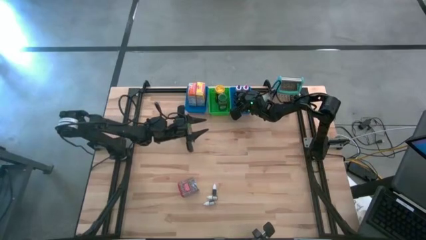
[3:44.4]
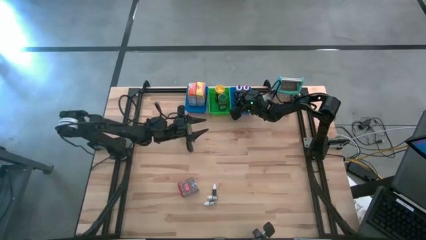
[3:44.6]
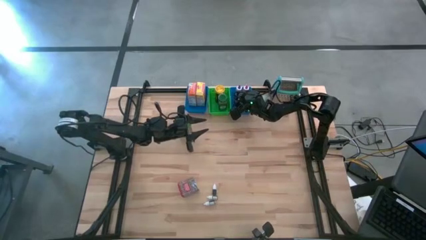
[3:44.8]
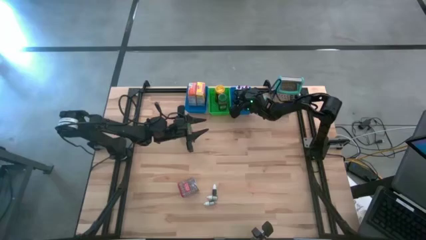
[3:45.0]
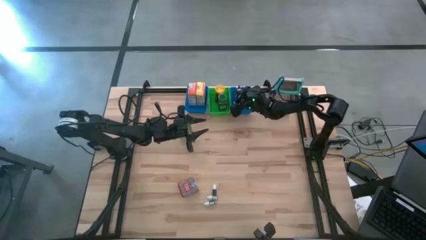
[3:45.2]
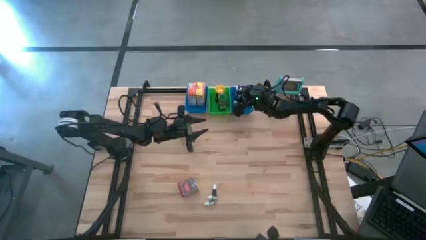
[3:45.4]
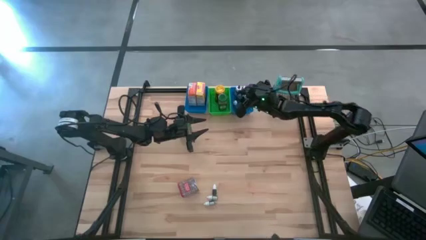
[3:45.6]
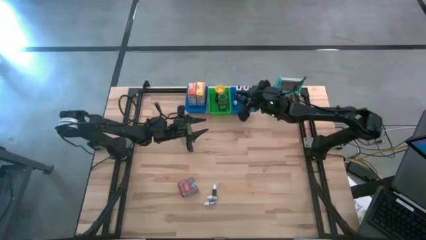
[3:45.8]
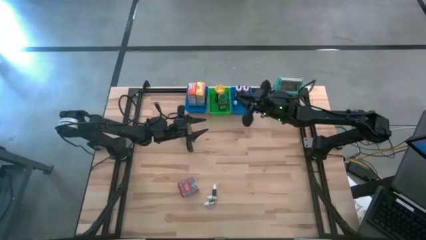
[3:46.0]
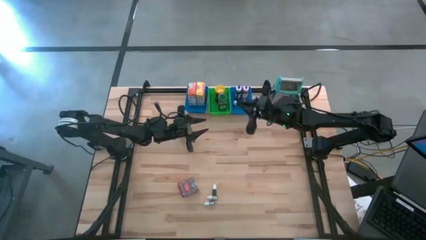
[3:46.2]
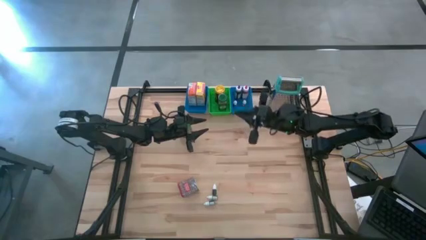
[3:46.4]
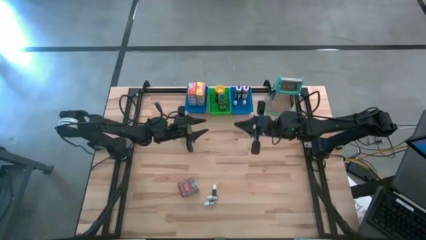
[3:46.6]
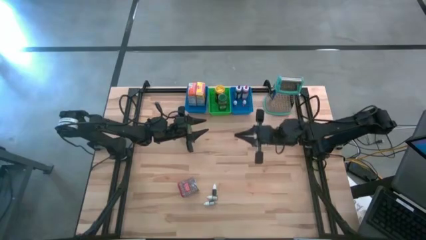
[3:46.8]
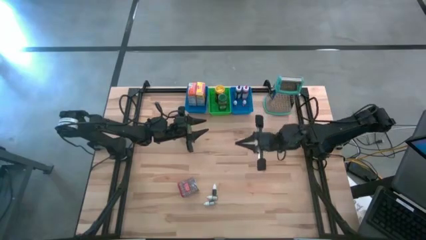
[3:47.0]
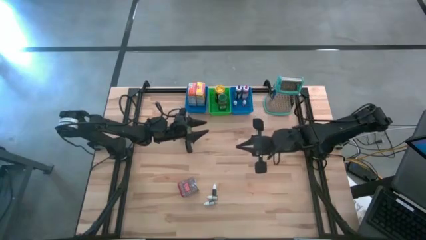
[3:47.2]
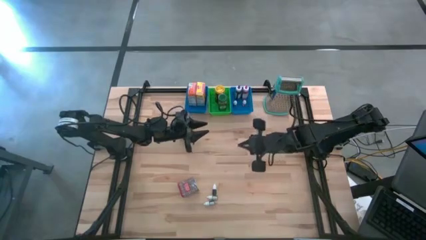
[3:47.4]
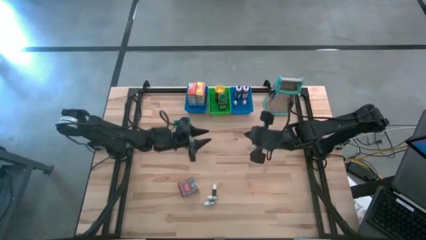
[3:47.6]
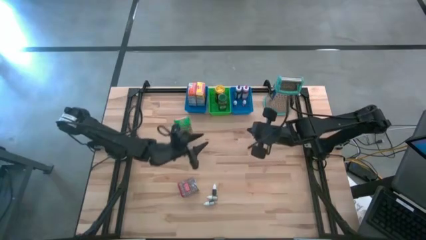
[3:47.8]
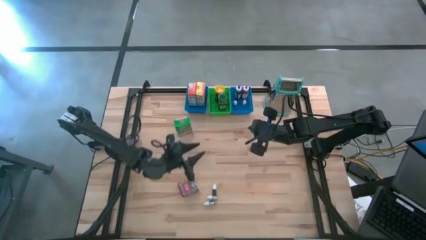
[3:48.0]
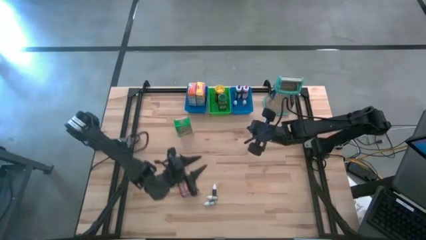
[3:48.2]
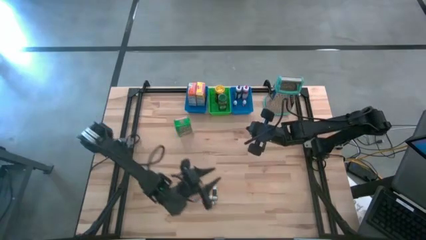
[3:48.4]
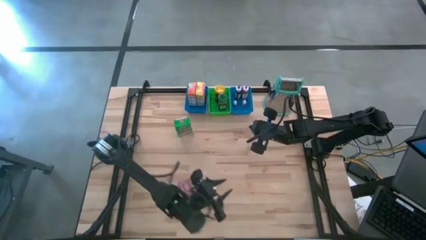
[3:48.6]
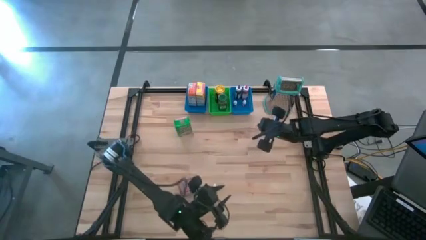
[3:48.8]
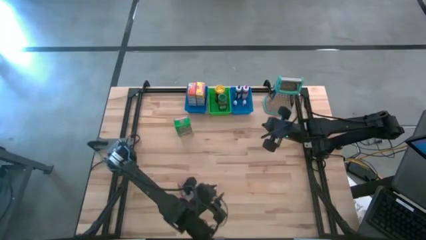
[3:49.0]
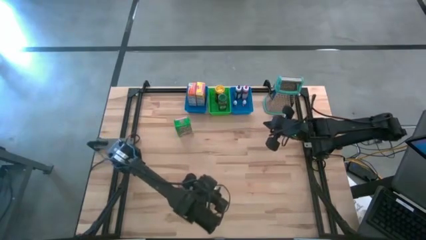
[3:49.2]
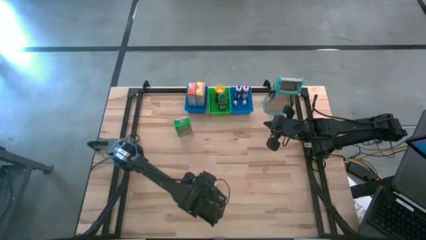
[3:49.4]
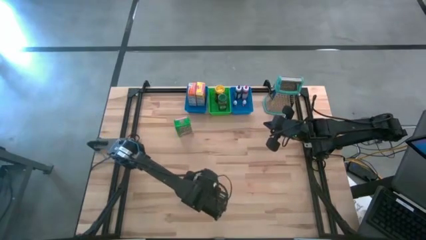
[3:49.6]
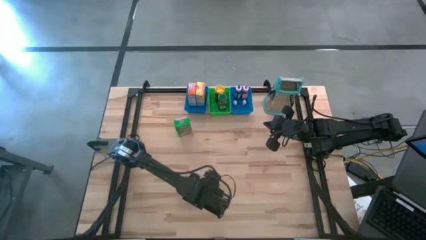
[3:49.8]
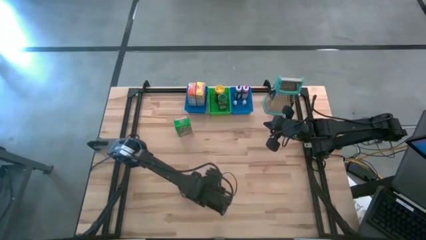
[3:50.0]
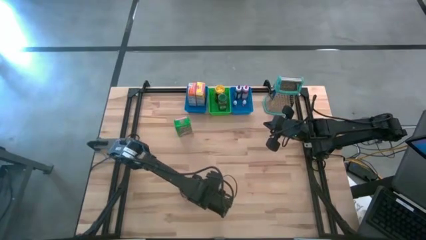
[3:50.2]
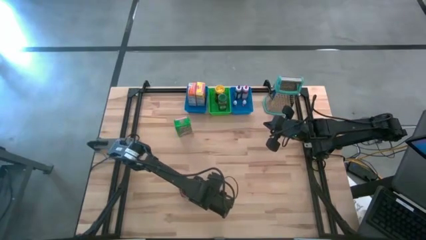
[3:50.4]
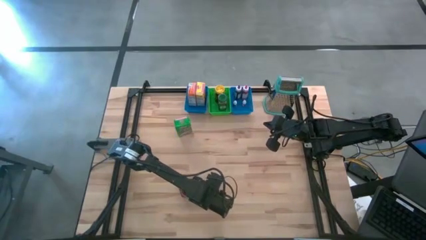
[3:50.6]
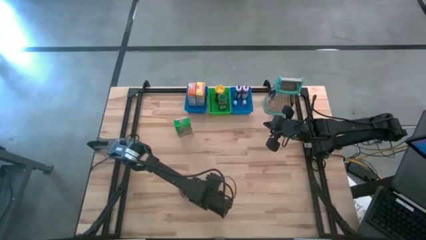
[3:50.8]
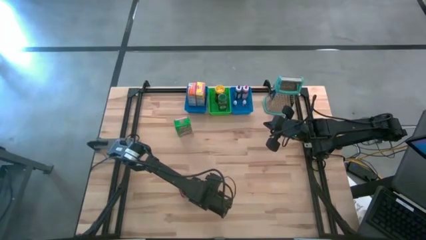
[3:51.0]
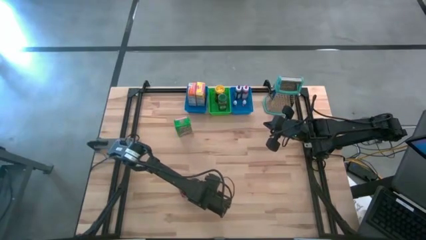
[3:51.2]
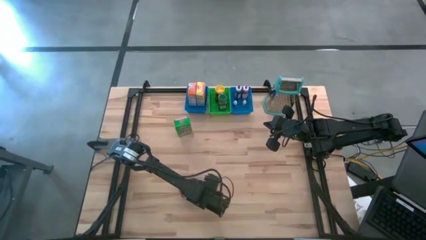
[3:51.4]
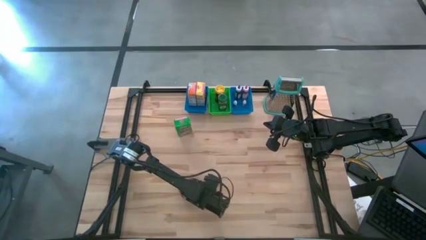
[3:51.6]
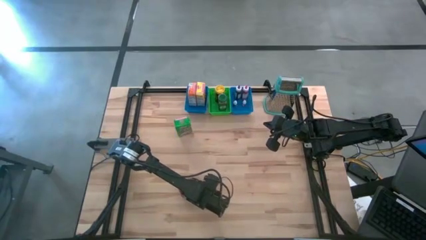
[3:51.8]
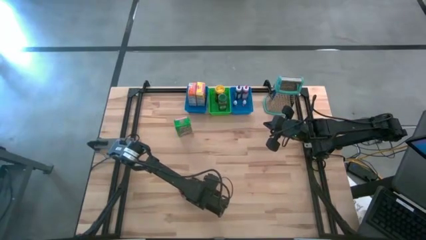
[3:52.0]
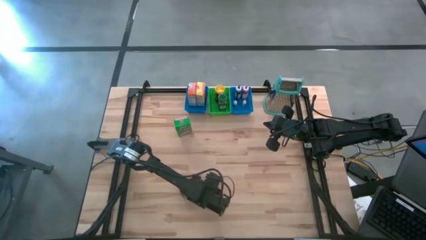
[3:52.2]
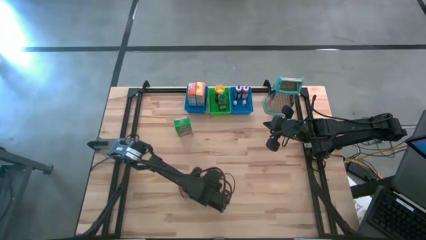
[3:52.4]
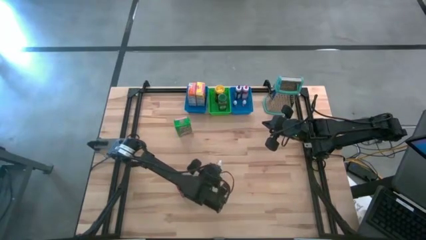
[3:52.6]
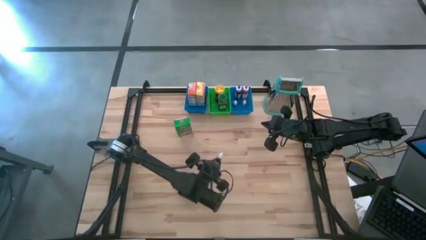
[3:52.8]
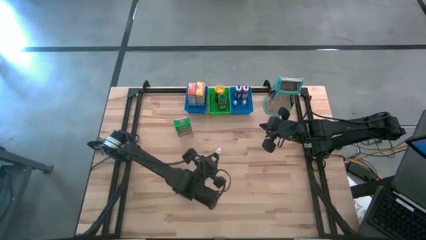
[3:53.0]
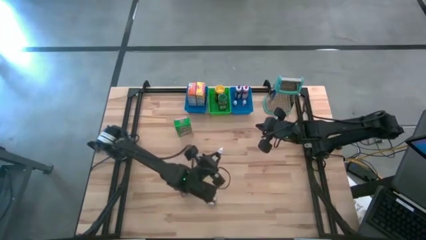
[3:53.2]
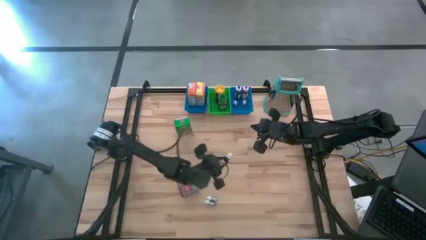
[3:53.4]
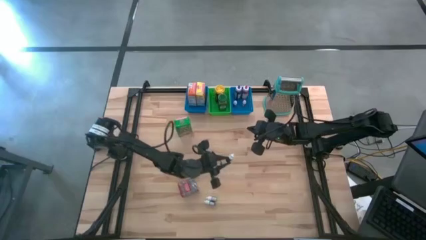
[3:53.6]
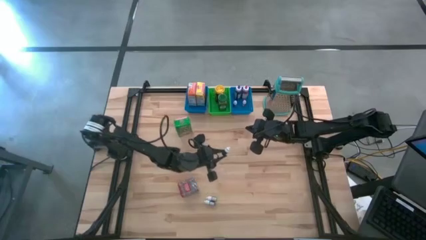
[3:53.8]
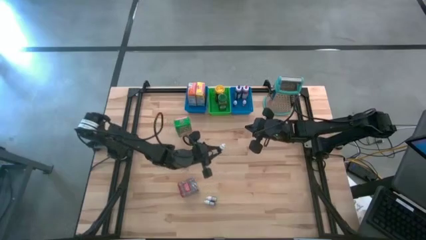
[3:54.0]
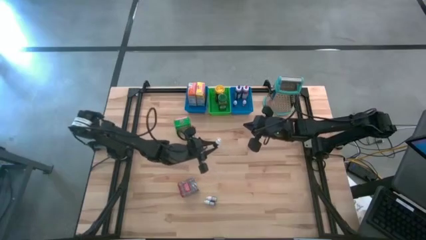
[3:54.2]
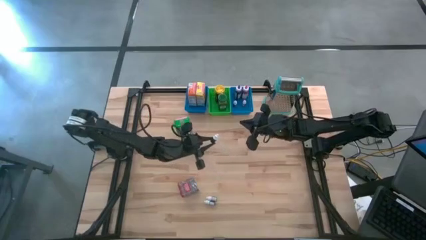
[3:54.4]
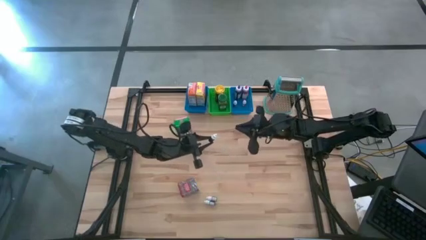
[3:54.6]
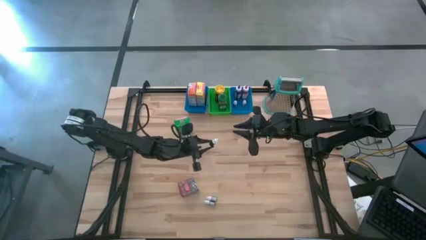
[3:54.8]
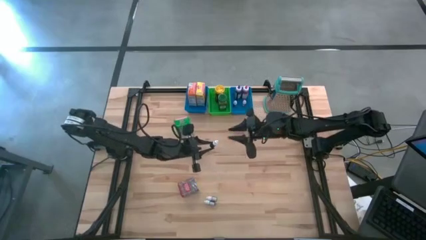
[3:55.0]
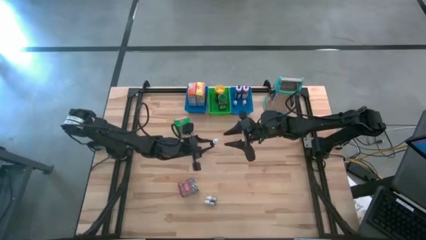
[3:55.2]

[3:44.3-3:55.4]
Task: Pick & Place Kitchen Items
Put the top small purple food bottle coloring into the right blue bin

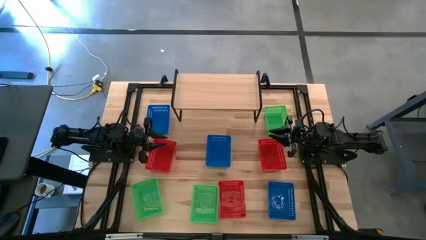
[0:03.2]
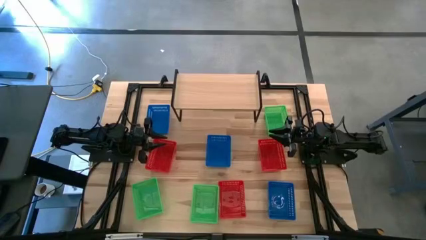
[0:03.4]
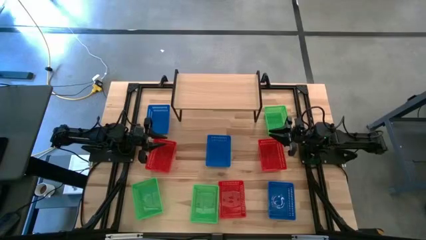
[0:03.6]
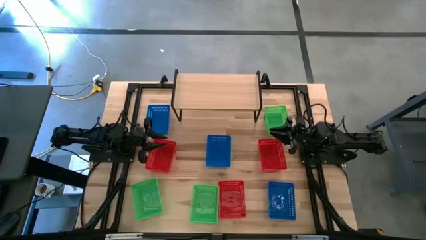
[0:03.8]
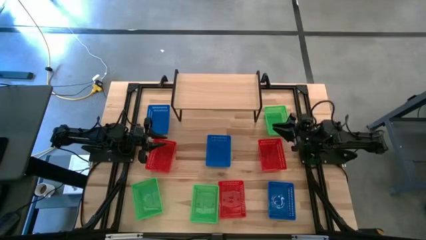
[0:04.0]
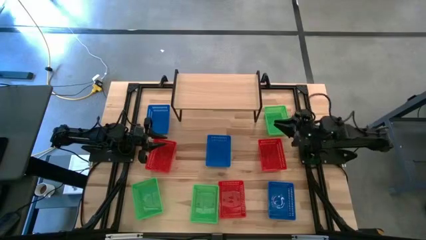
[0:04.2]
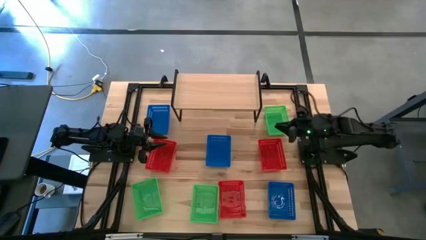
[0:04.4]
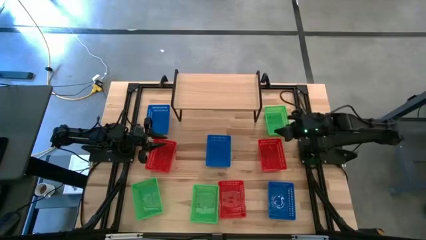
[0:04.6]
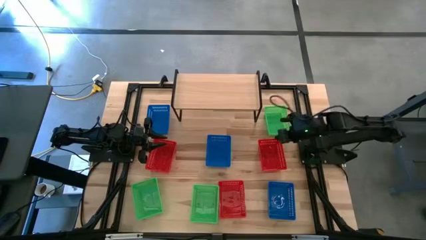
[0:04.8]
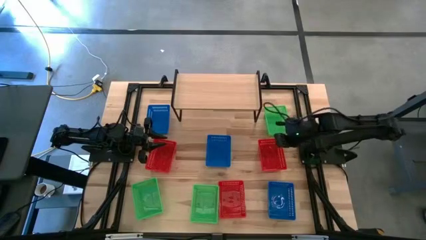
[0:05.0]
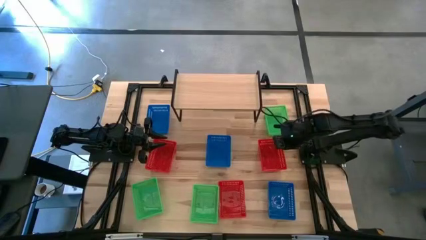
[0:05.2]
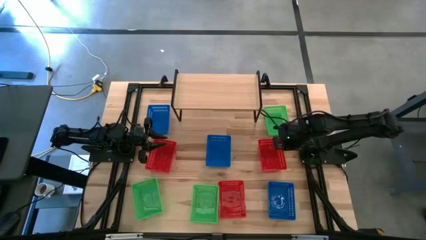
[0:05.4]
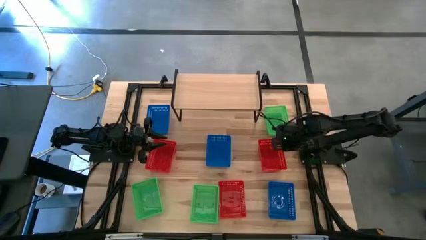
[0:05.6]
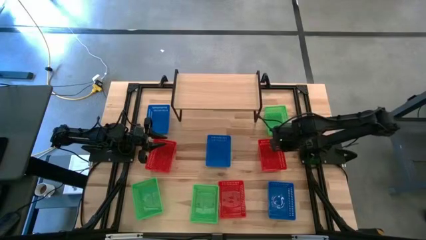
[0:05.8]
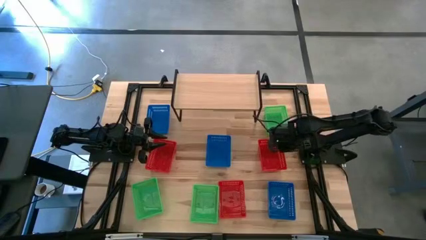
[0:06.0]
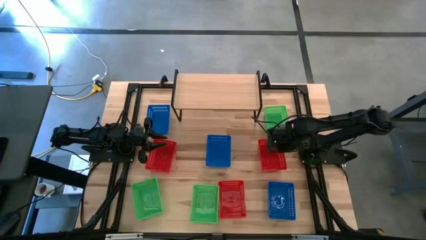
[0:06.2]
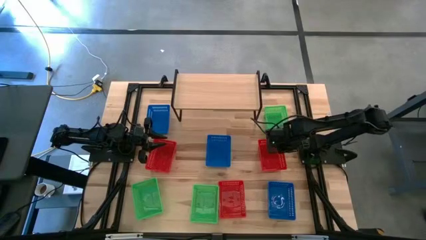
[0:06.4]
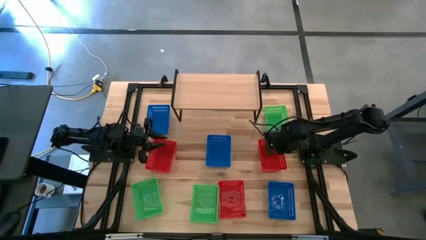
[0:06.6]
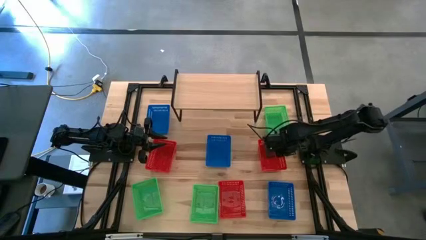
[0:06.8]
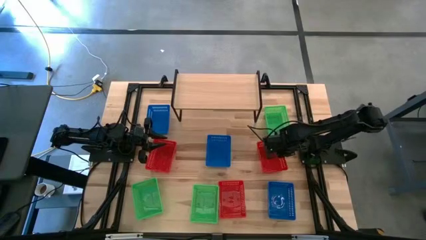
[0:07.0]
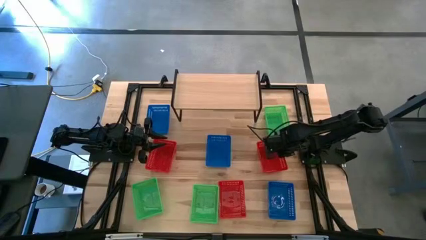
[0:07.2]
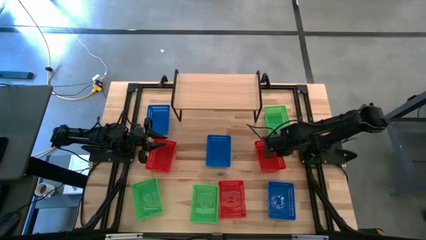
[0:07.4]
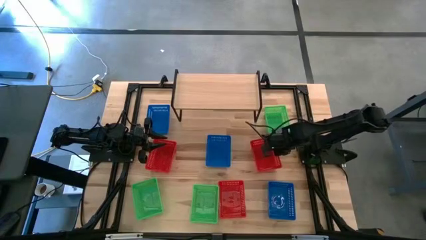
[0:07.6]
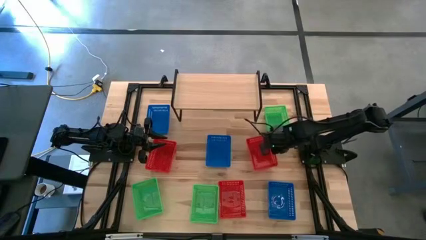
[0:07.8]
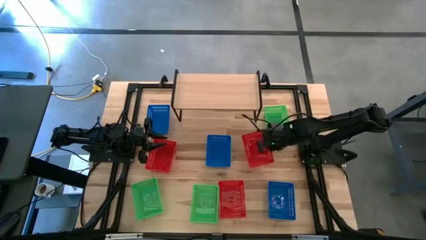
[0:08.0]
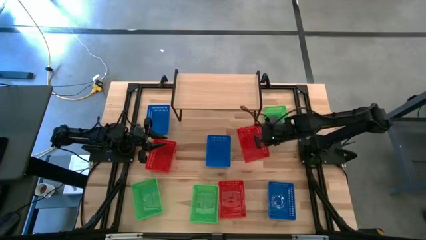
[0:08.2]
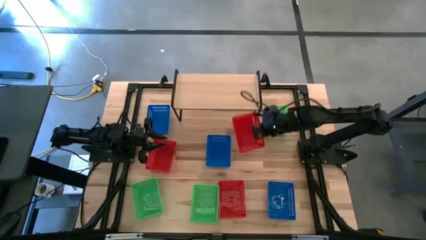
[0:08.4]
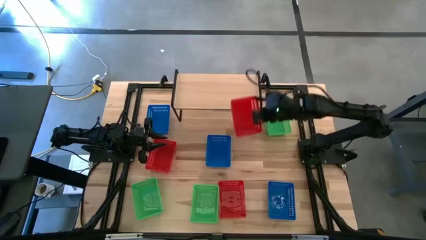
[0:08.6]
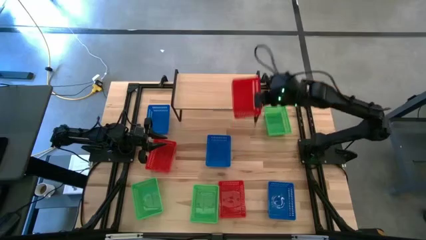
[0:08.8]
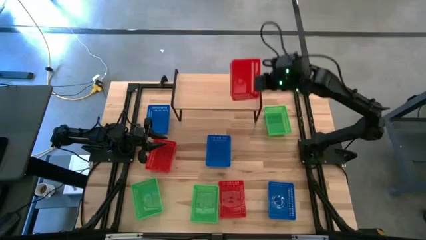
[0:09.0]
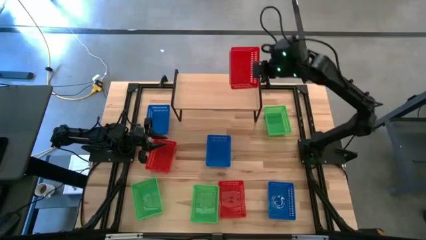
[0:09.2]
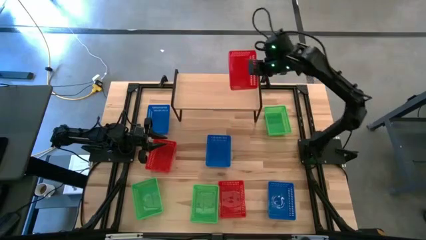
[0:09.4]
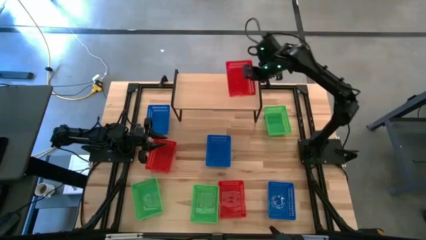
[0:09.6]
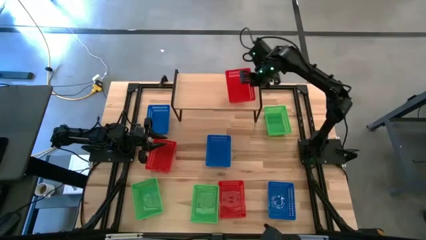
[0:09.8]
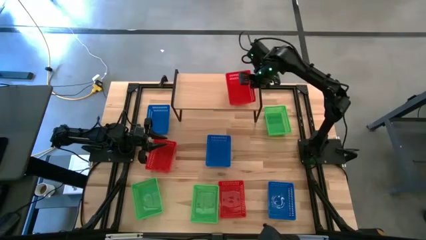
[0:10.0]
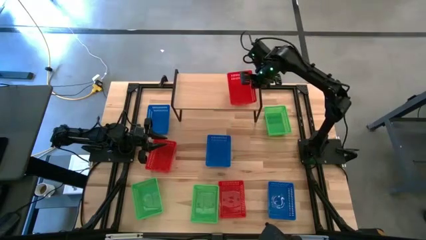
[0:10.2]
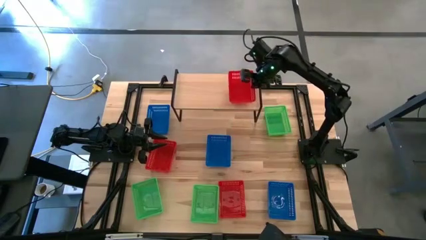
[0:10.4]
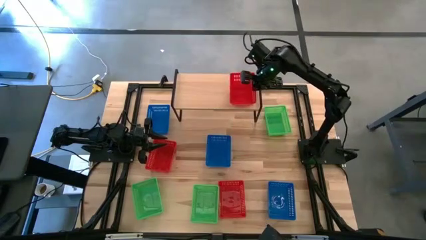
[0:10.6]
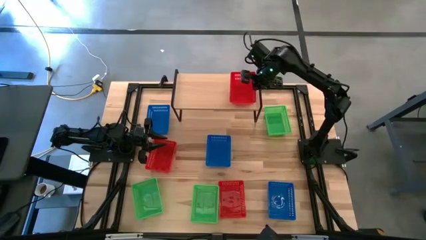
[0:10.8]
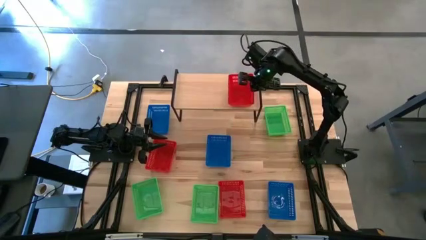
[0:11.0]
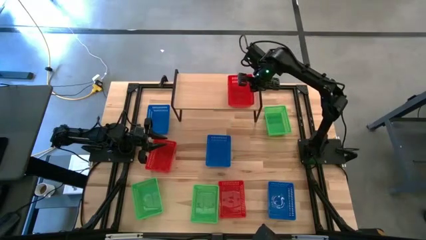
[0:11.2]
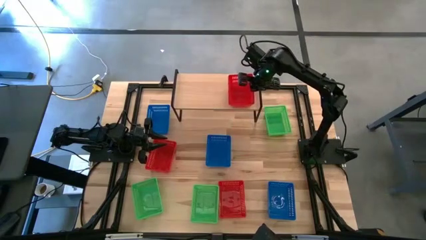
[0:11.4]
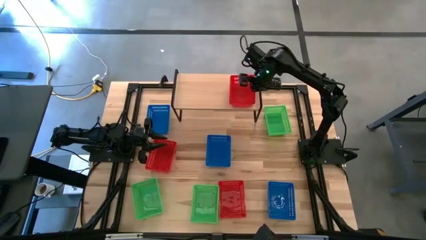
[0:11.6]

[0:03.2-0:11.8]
Task: Stack baskets on shelf by color
Put the top right red bin on the shelf
